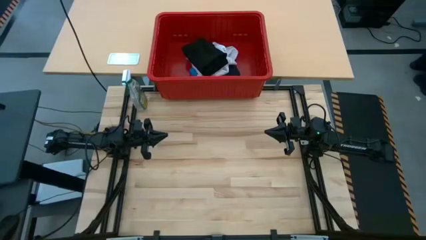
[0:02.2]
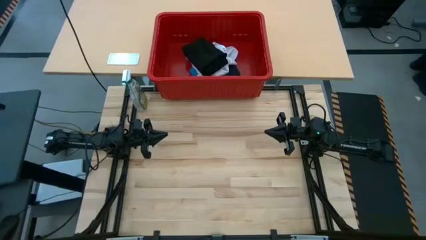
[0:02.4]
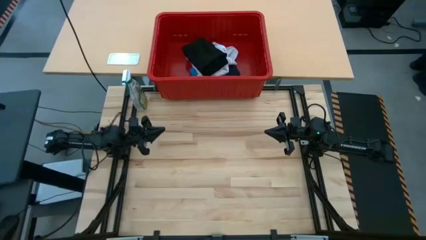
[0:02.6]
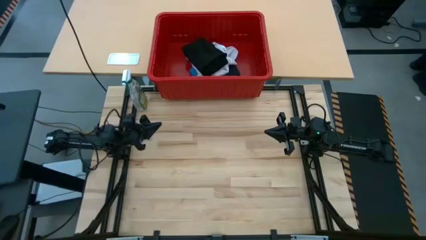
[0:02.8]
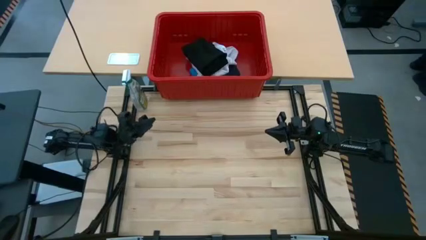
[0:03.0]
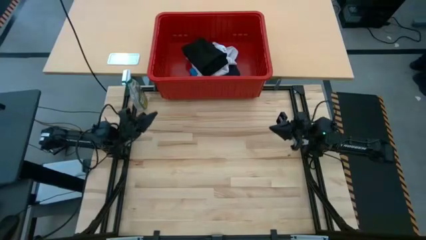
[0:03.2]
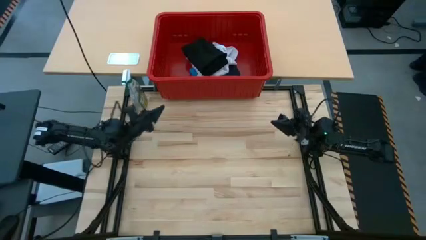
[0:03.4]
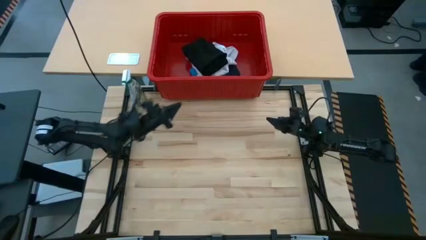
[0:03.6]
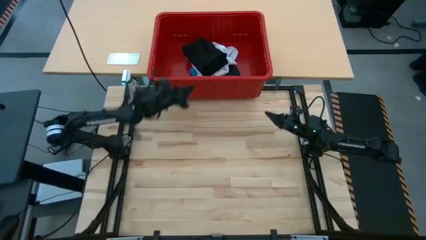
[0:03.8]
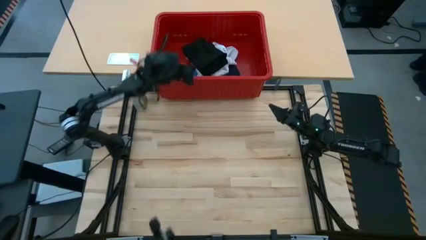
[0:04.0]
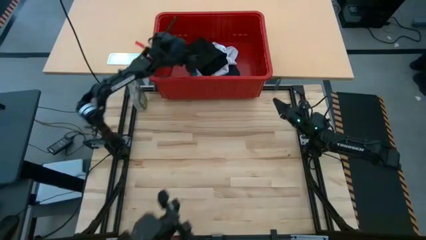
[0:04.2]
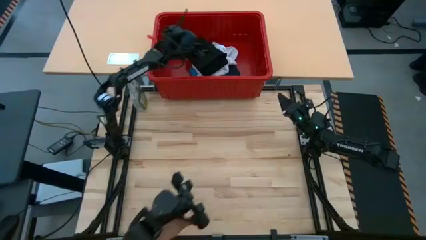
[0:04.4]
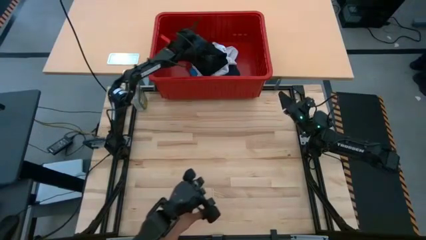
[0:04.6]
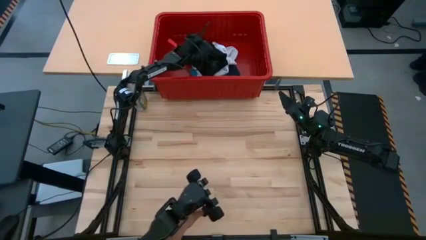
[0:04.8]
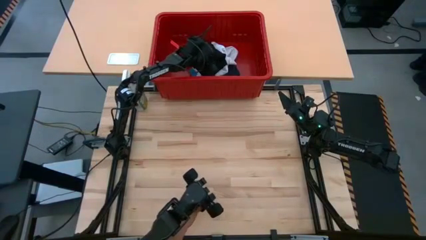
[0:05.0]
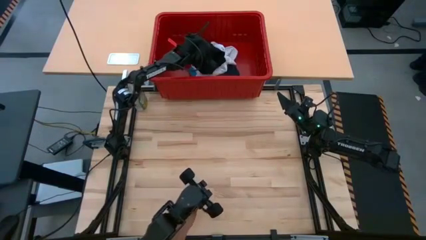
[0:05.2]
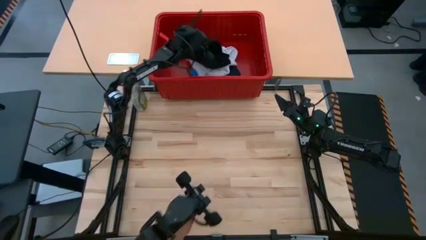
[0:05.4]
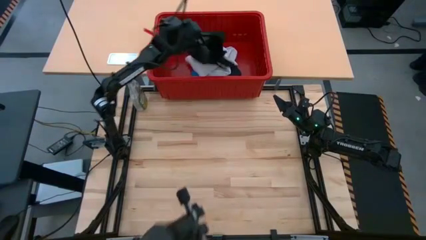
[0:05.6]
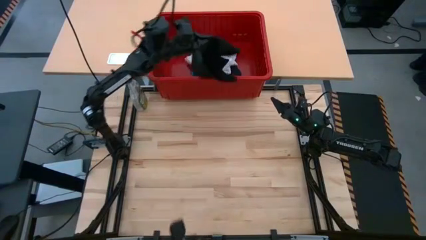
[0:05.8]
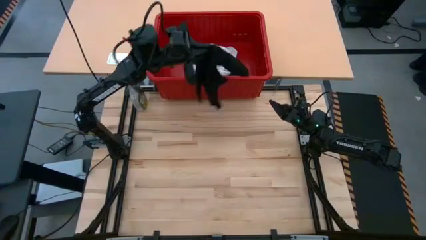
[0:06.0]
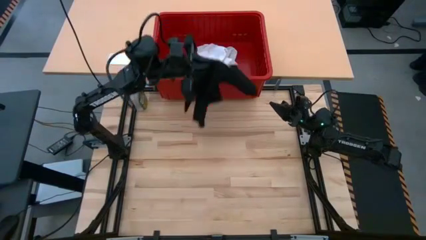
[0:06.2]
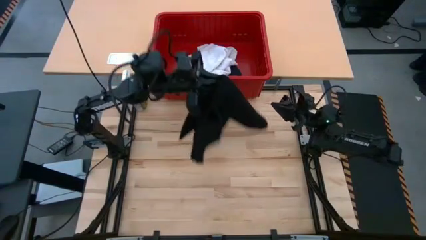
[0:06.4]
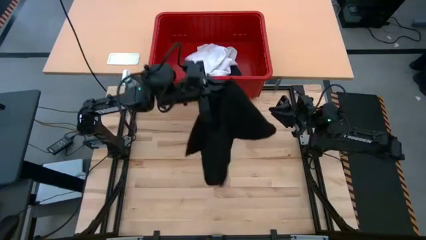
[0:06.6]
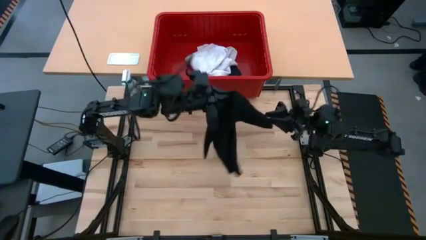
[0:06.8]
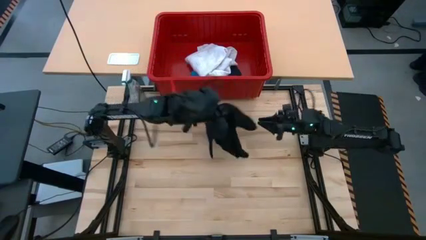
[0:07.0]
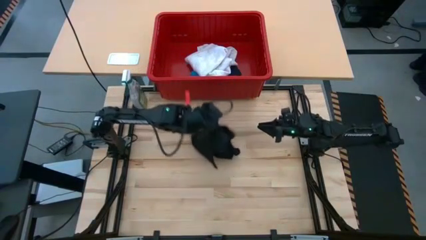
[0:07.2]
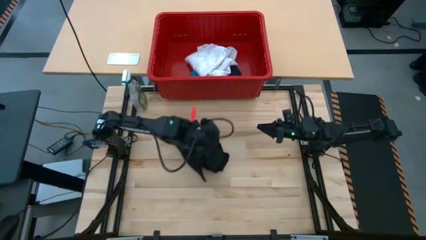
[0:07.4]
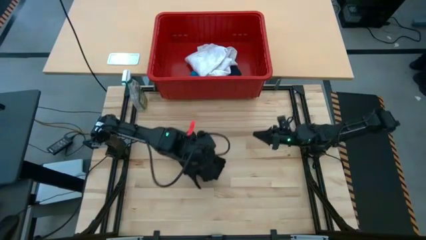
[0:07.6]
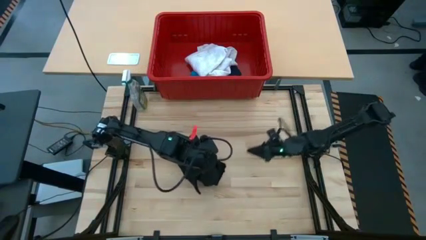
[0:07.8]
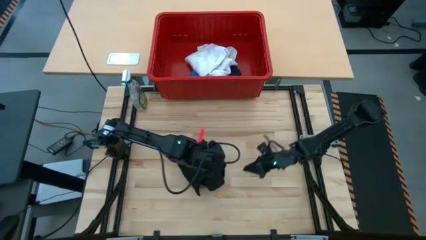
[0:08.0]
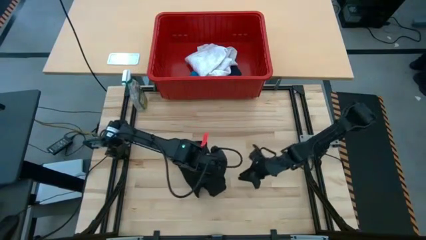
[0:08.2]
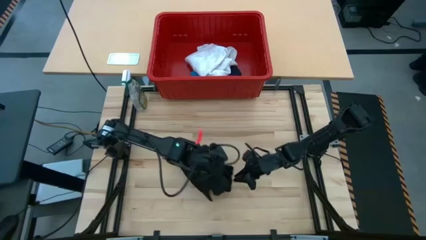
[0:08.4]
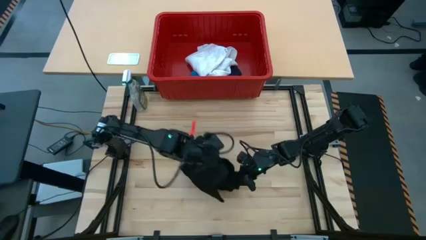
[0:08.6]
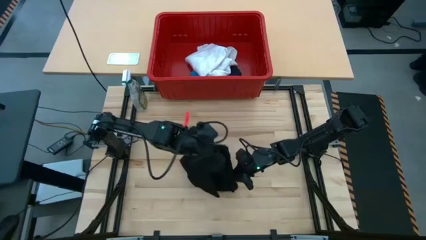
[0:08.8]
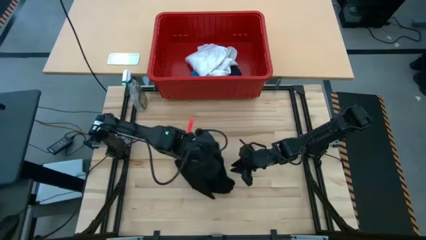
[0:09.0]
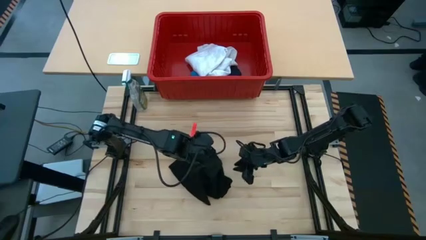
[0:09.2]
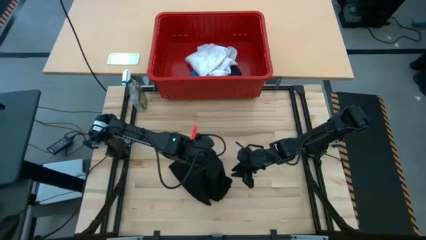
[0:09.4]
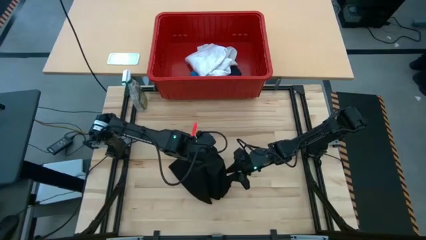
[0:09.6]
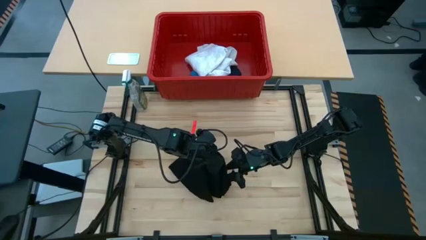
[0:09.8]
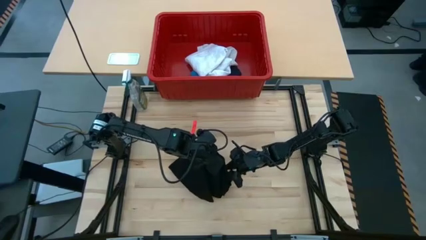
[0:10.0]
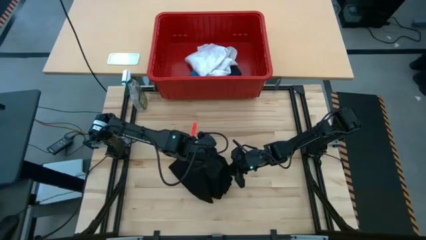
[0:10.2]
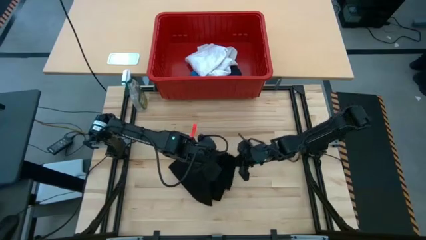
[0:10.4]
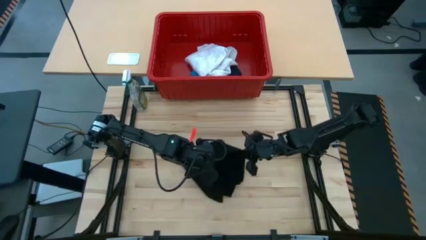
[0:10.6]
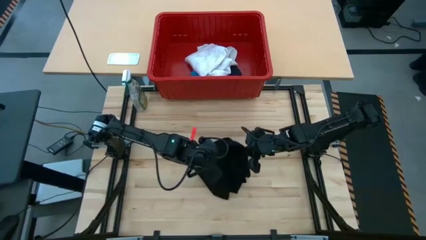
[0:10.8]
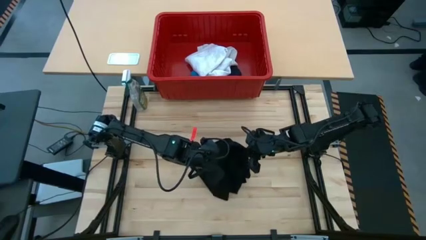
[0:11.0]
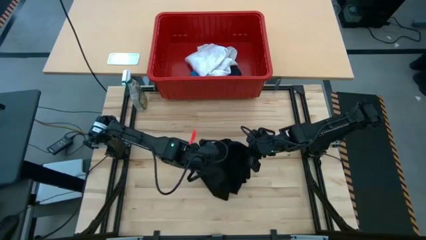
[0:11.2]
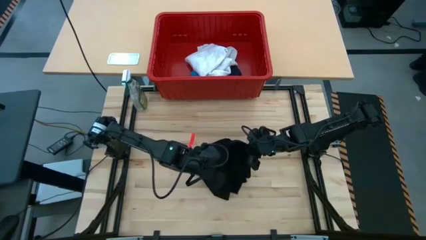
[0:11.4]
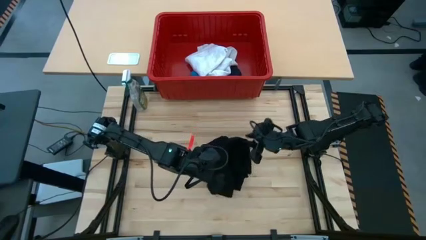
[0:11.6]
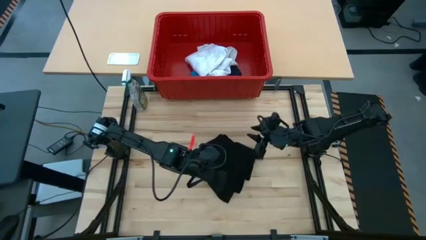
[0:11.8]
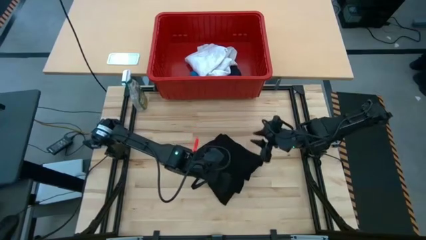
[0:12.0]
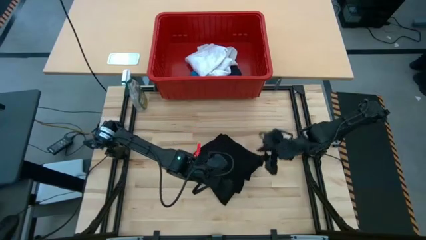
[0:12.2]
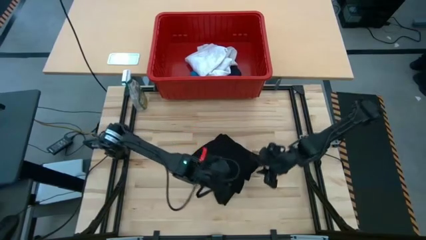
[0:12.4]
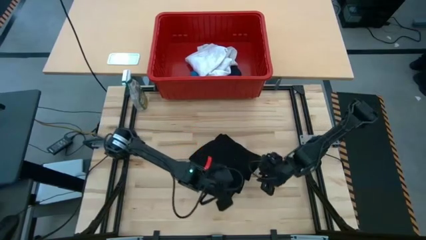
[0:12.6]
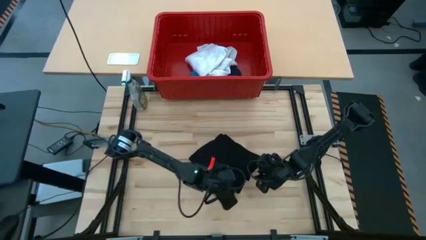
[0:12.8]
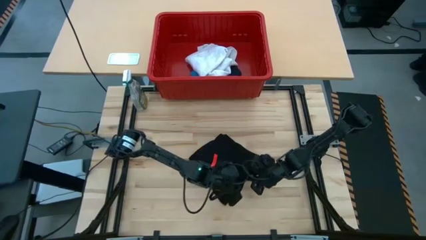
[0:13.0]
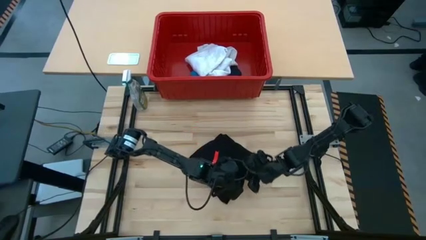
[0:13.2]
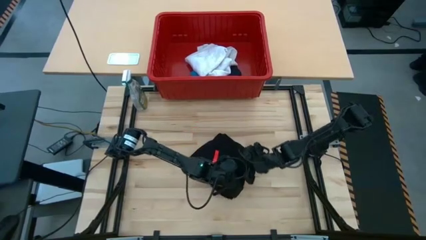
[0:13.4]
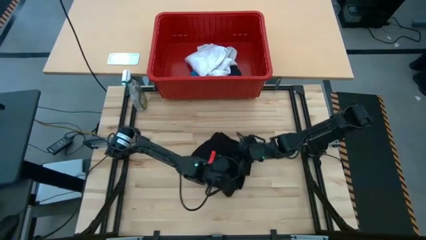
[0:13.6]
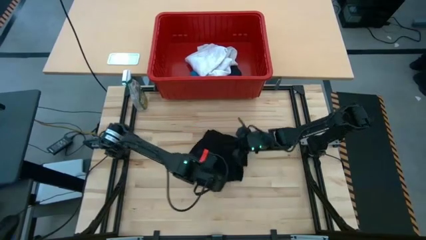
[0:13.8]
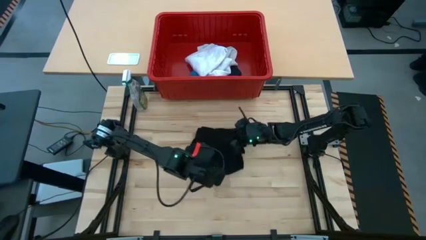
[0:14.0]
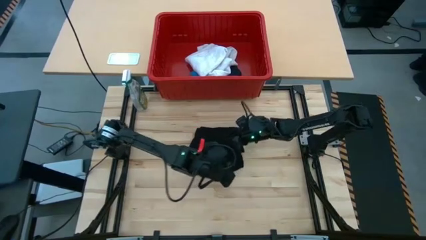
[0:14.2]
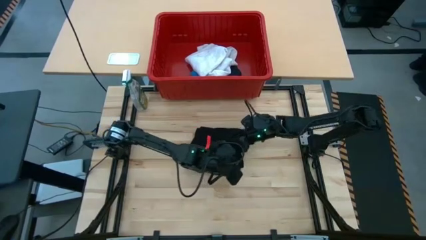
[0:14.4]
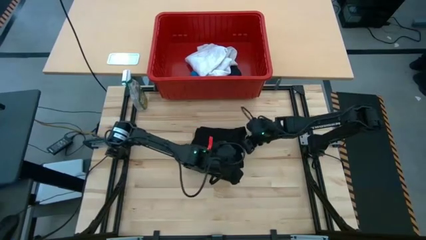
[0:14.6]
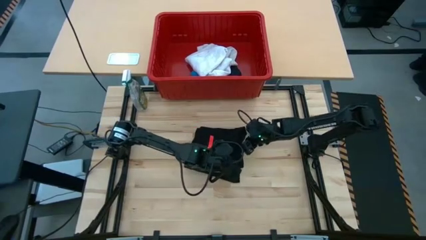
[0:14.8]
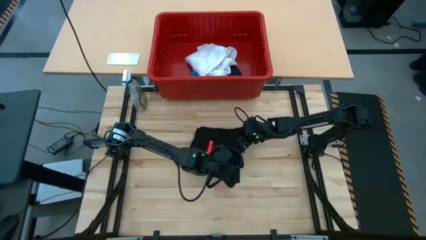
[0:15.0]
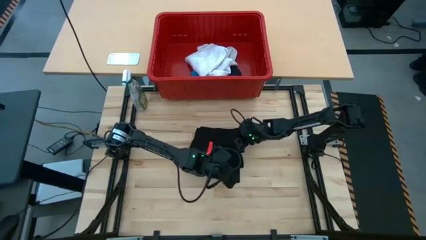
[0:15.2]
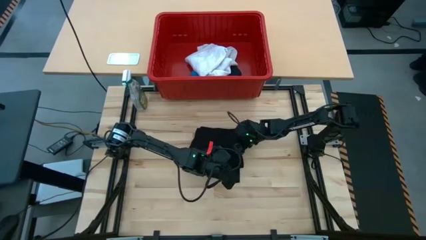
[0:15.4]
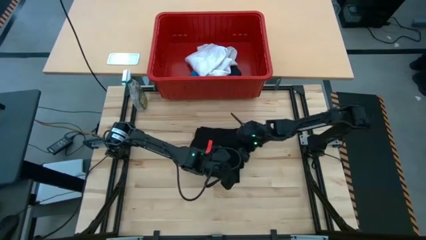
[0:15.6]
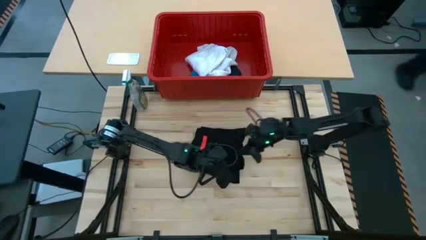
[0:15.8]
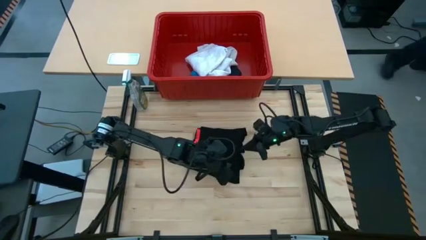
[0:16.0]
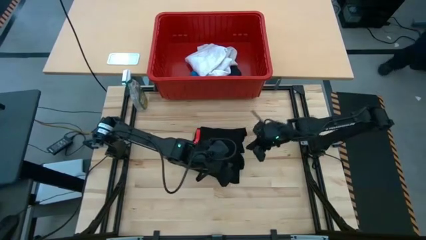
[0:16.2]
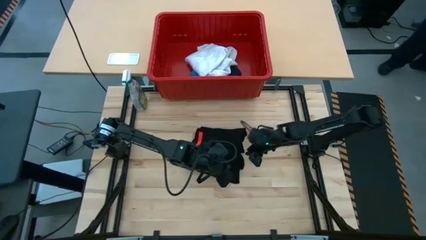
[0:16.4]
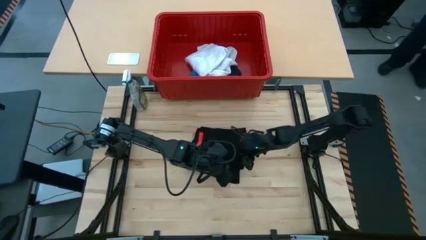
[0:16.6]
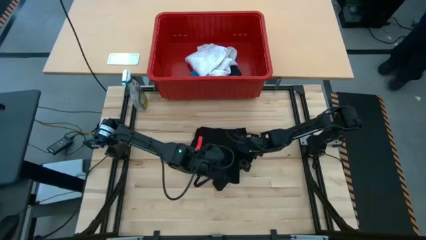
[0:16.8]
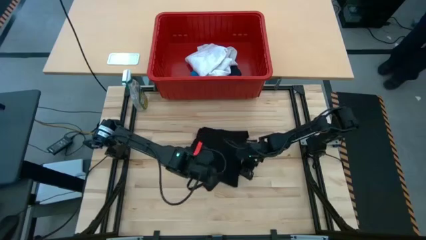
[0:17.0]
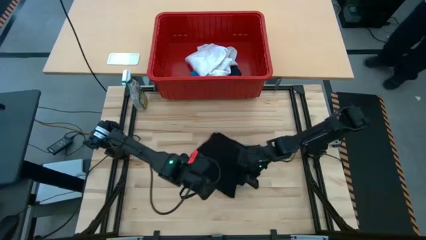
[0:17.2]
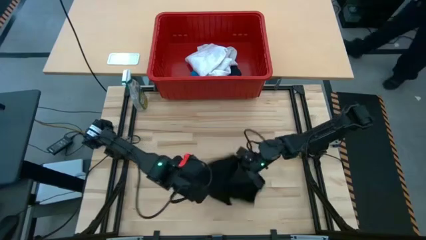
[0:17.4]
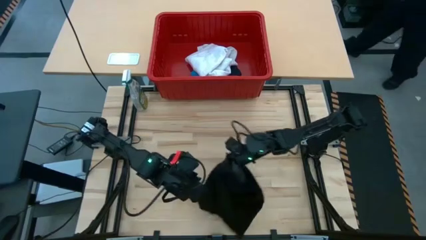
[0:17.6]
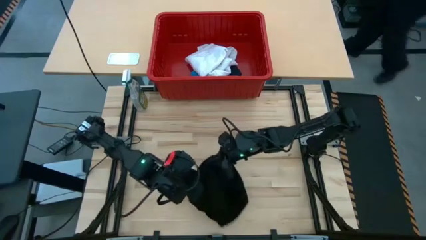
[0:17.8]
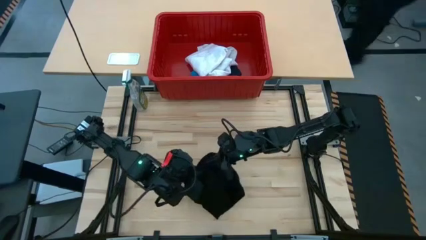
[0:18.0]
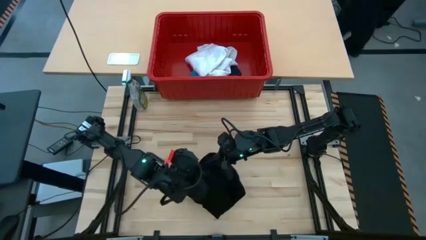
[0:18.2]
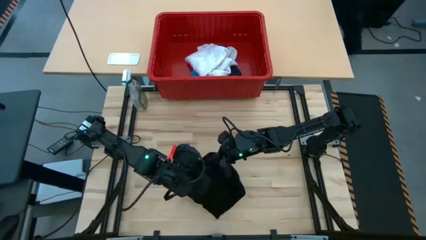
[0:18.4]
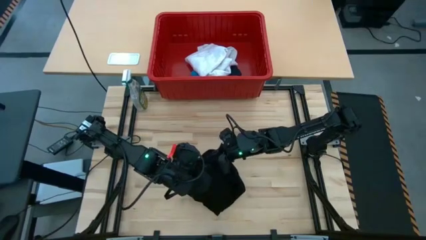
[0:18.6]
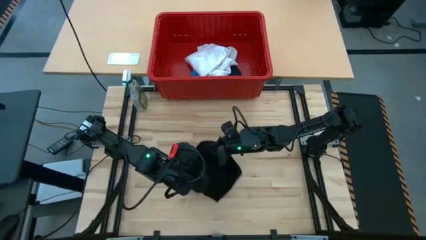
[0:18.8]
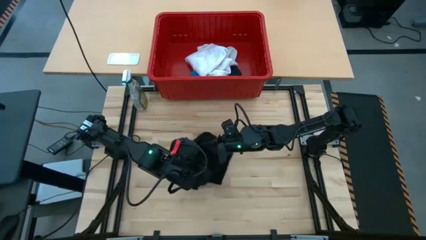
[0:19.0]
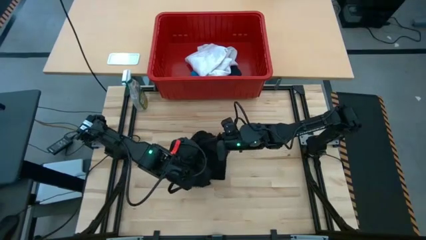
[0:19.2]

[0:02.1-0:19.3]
Task: Fold laundry
Fold the black shirt on the table
